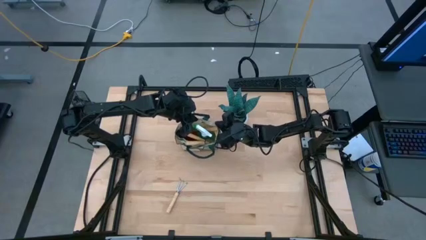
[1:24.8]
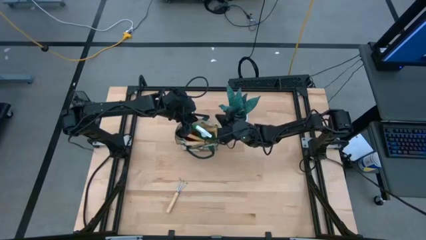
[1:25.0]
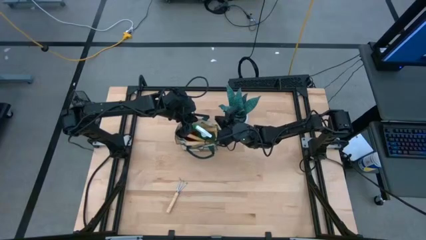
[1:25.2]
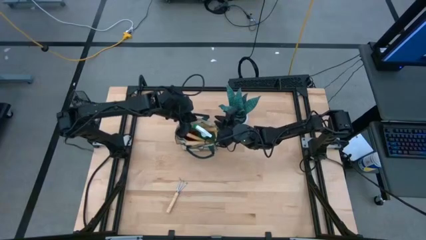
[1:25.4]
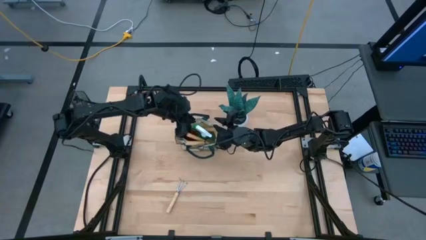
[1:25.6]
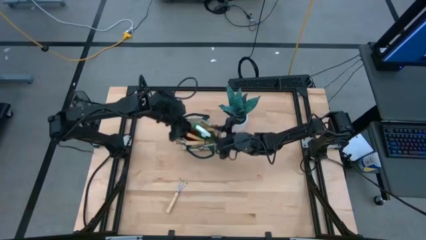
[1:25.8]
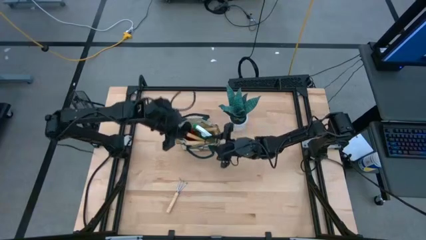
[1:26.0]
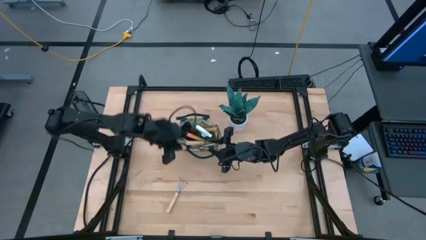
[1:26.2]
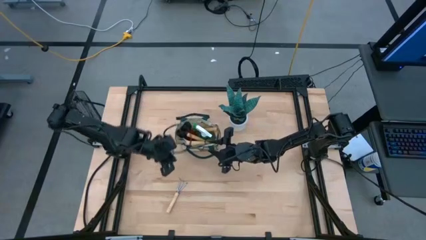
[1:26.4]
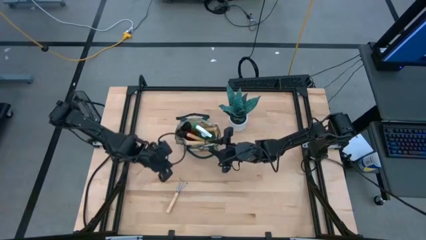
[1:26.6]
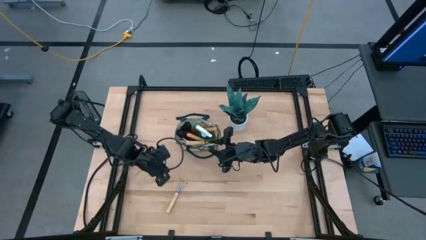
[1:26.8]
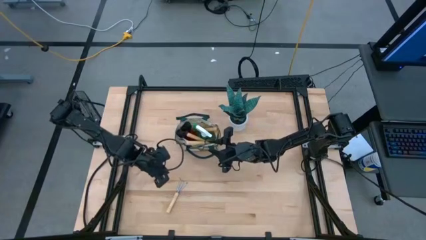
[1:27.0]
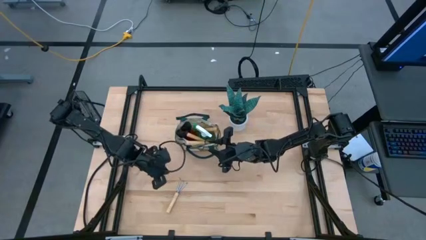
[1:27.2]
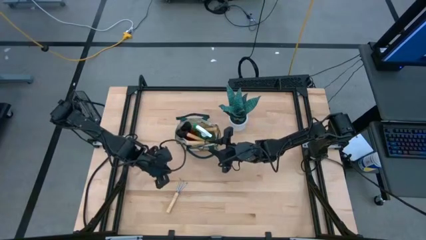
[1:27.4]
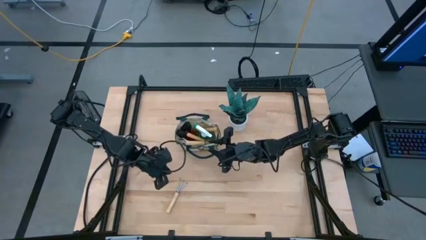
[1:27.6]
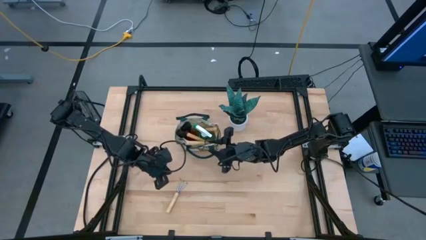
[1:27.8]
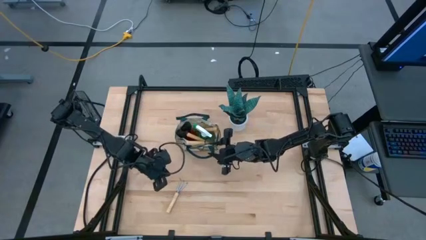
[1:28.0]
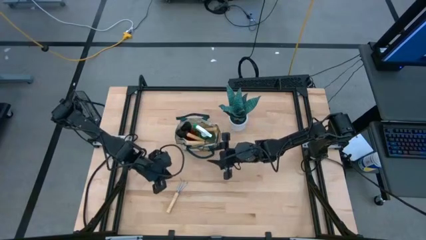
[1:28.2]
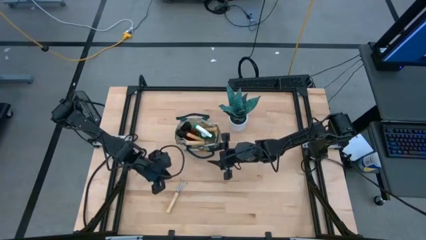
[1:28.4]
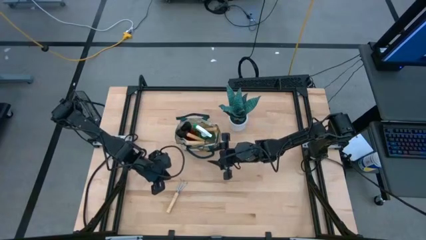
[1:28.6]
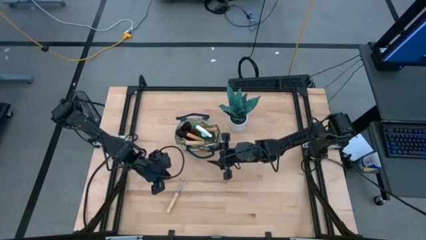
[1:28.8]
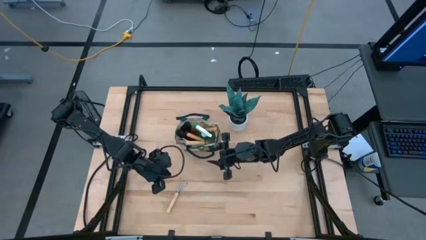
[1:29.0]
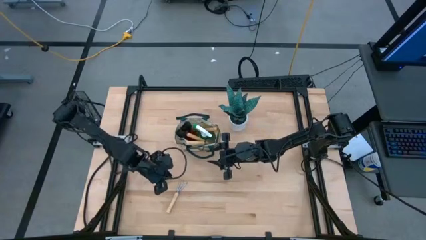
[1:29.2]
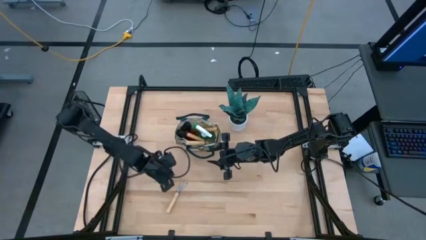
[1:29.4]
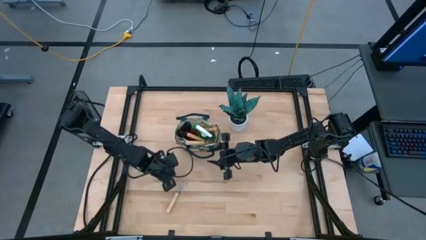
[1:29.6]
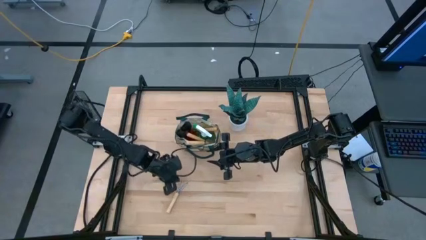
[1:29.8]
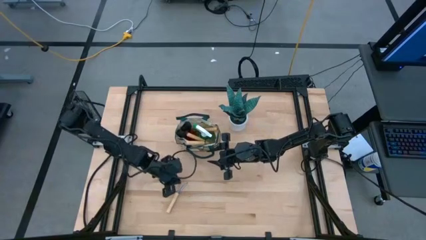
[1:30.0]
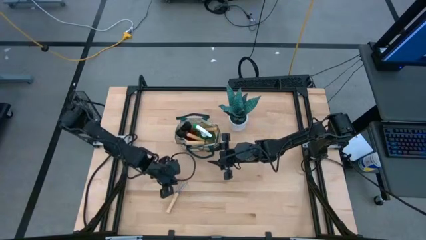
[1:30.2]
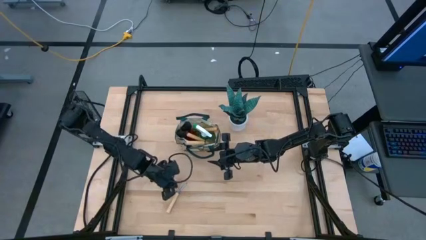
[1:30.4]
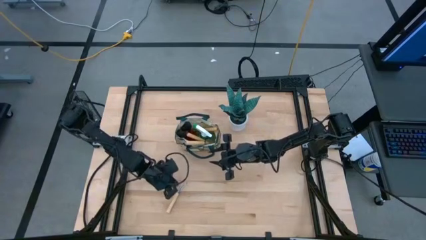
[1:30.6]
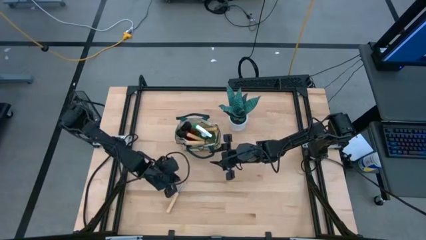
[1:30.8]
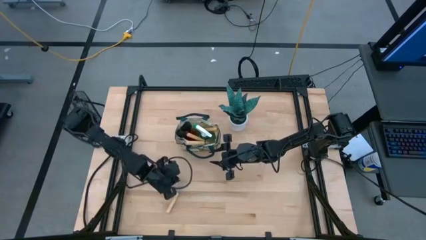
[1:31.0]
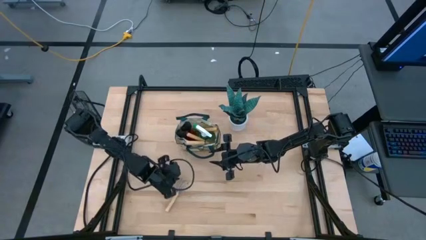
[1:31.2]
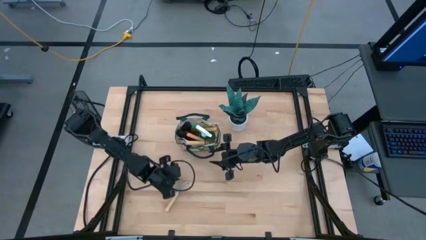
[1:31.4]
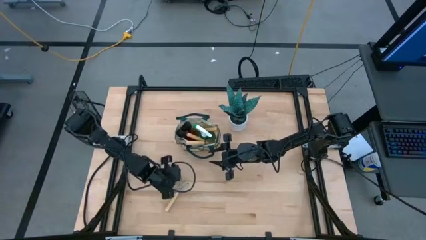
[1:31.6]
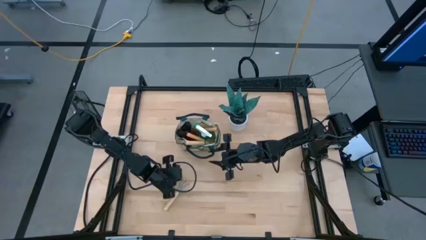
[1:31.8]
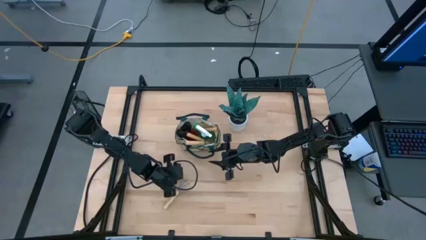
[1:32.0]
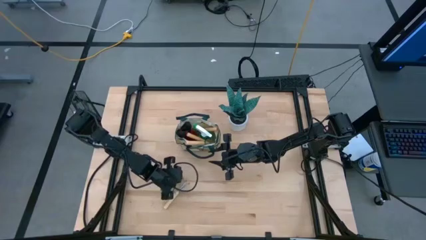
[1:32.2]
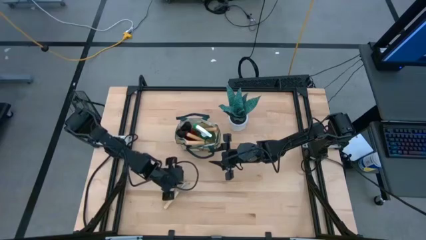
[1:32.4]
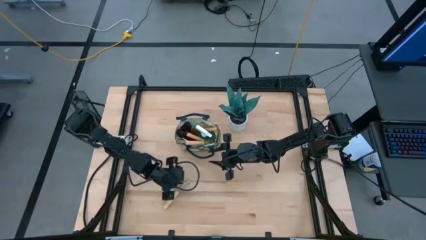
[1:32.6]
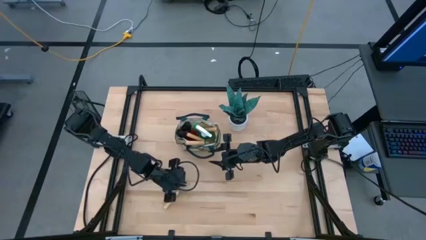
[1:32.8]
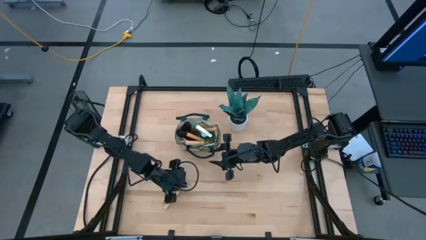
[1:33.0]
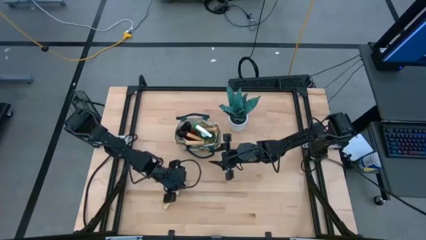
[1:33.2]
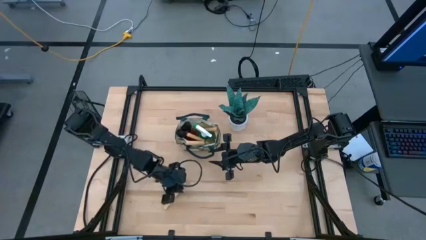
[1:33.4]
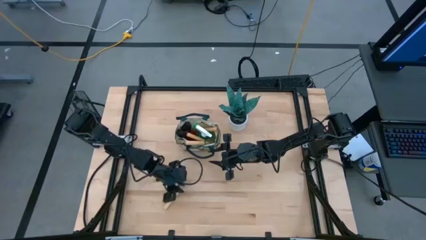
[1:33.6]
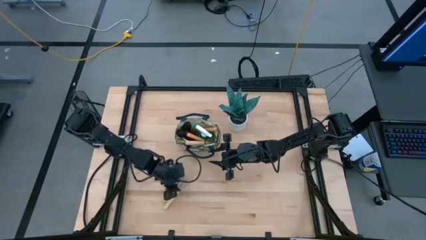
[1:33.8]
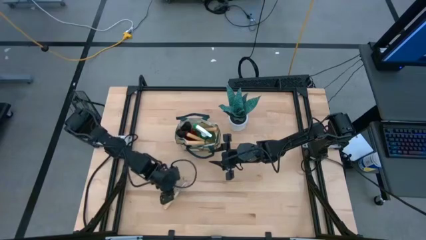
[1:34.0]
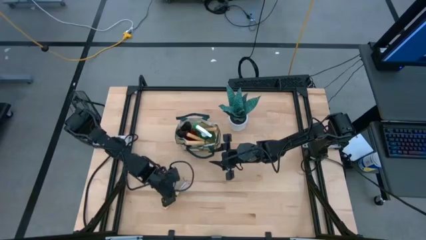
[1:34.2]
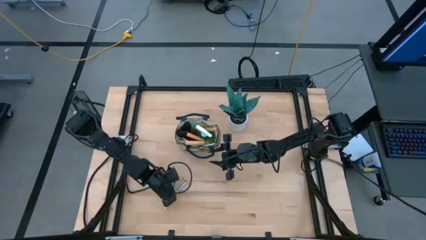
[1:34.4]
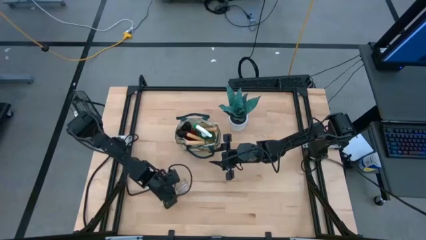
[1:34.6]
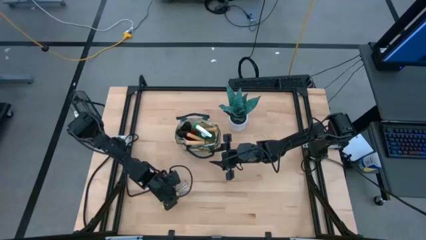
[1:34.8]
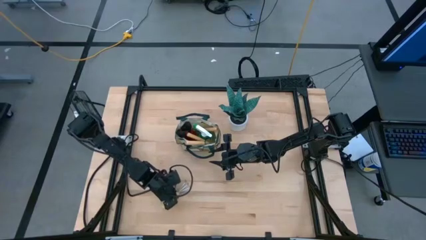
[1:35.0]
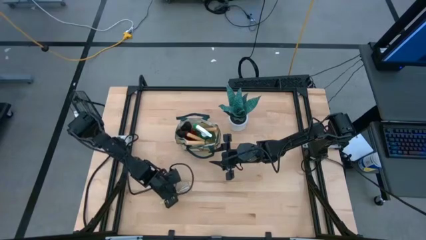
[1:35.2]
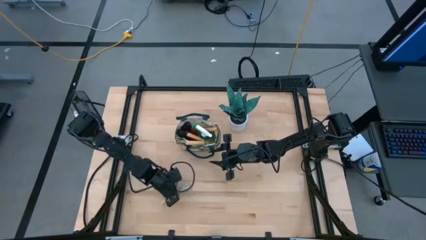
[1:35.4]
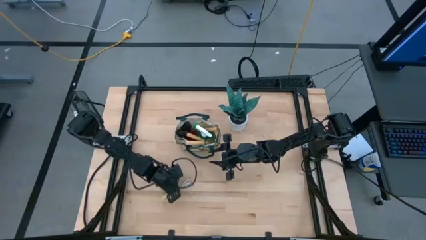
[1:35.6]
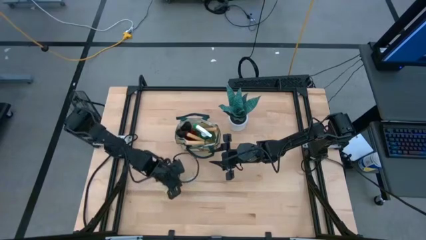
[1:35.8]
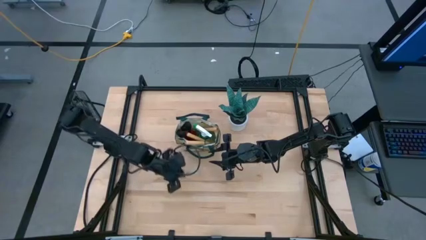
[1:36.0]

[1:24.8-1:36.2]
Task: Pick & Place Garden tools in Gardening bag
Put the brown hand rake into the white gardening bag

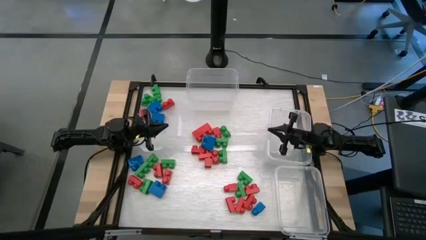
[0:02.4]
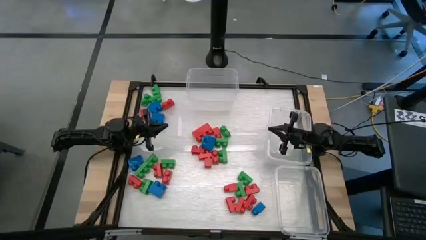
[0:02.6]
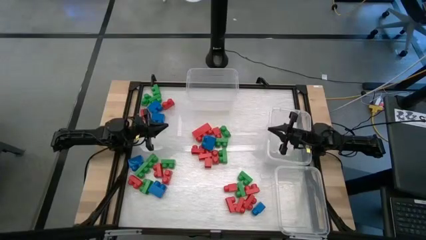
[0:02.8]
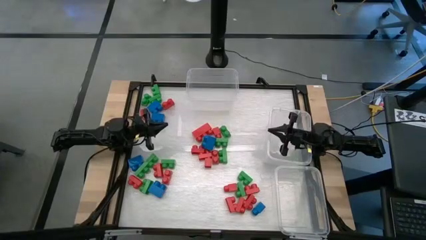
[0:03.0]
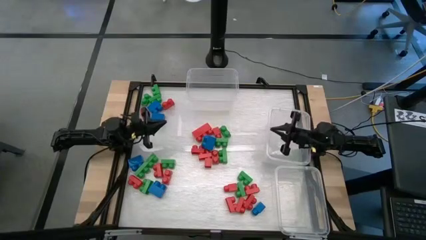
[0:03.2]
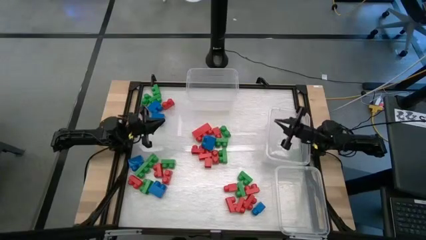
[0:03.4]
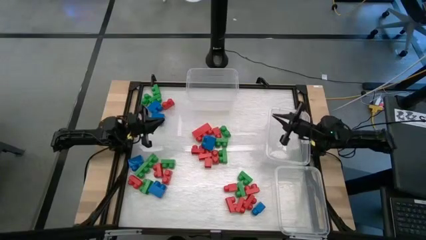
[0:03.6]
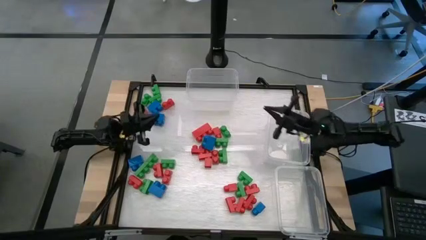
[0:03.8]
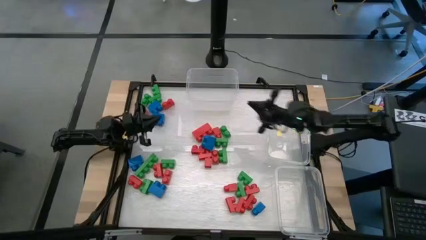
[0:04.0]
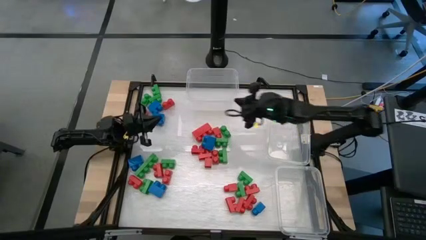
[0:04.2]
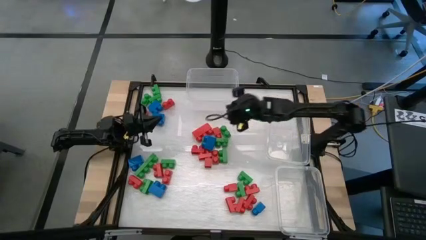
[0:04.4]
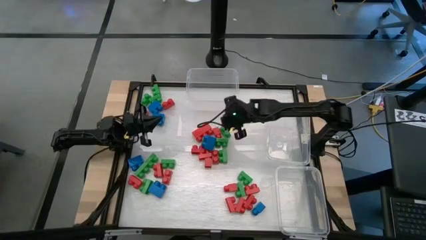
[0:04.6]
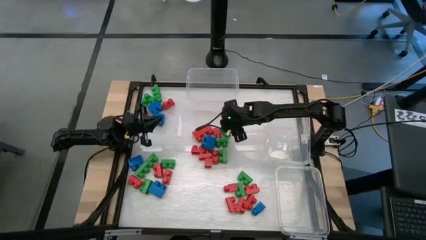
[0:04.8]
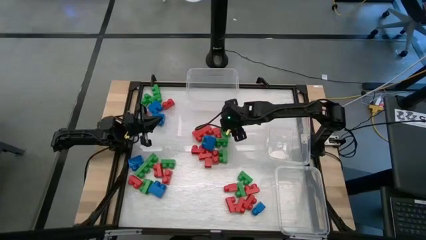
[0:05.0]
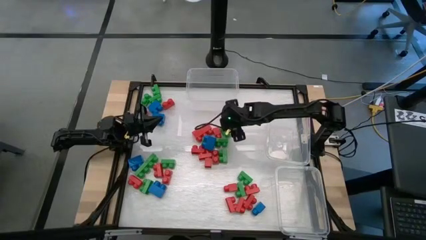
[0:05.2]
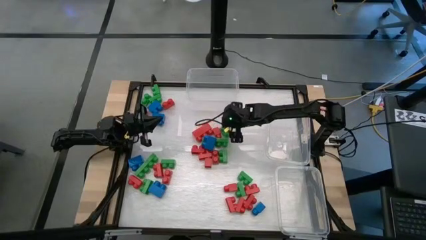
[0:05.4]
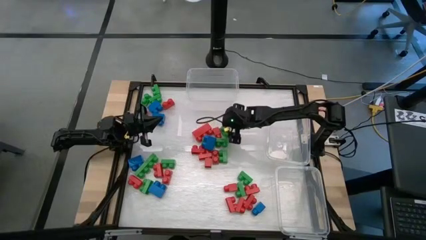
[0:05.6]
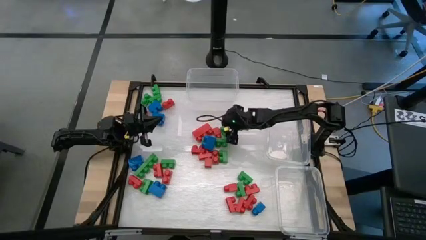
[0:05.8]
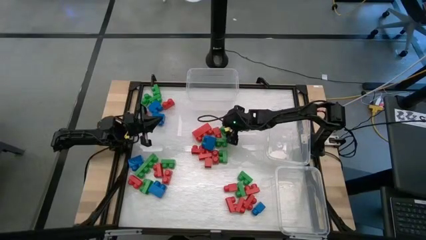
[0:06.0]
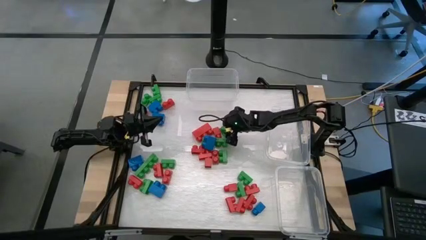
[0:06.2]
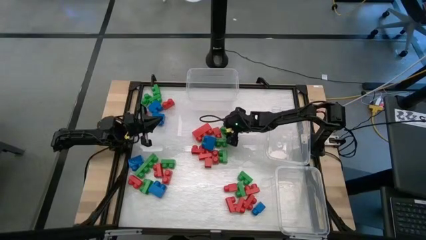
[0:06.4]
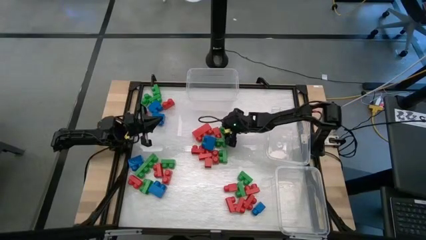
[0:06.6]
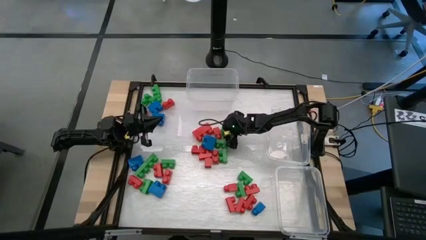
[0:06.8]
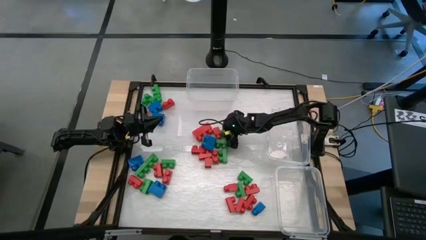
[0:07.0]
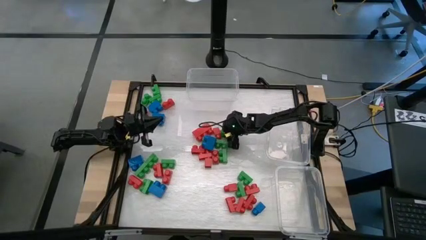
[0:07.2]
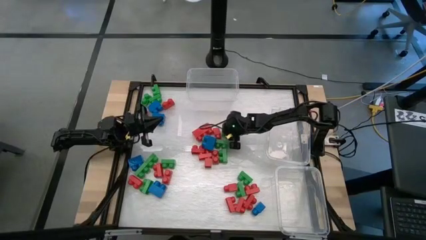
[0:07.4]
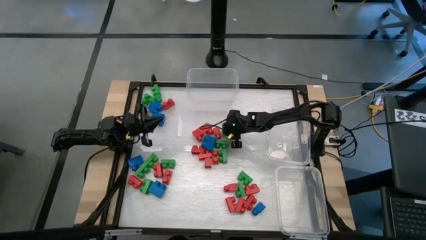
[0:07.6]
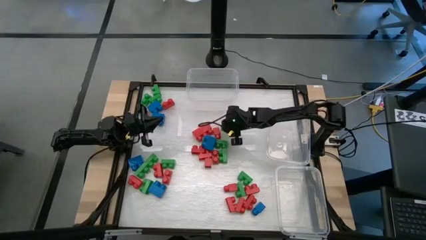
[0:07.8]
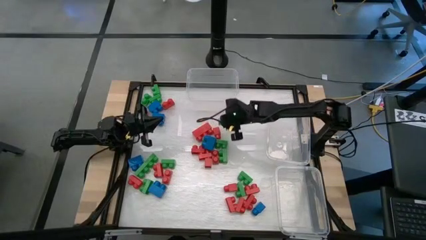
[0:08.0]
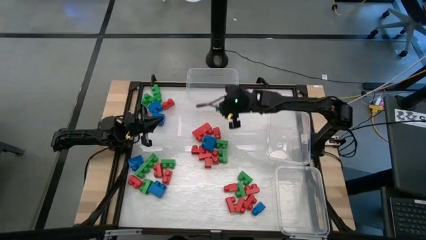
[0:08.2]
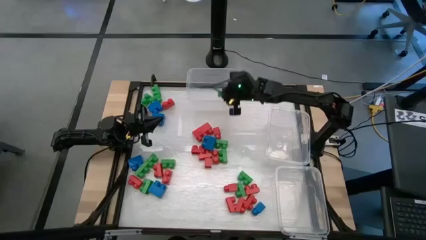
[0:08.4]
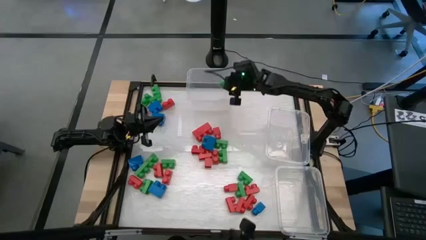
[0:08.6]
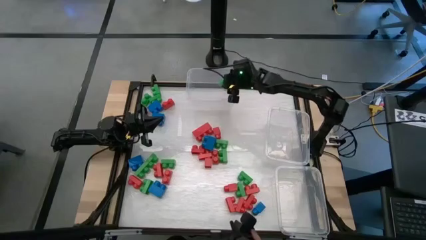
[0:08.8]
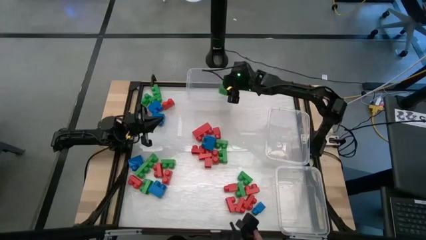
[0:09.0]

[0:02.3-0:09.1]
Task: Sort blocks
Put the green game piece into the top transparent bin
